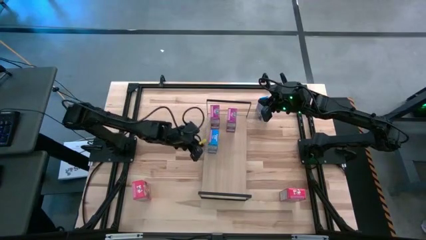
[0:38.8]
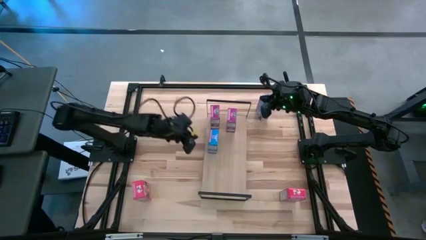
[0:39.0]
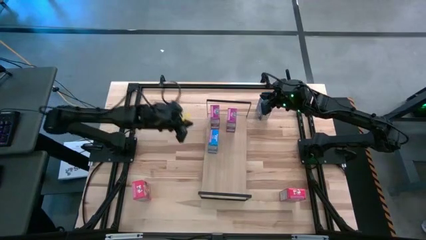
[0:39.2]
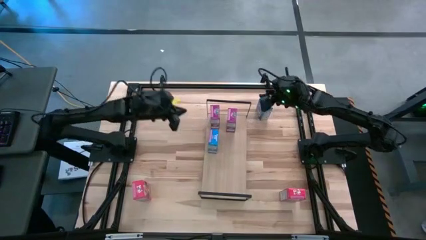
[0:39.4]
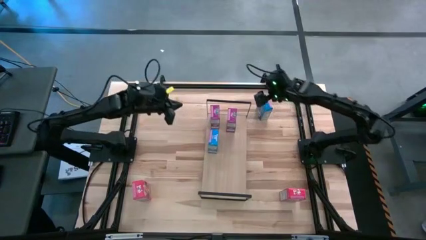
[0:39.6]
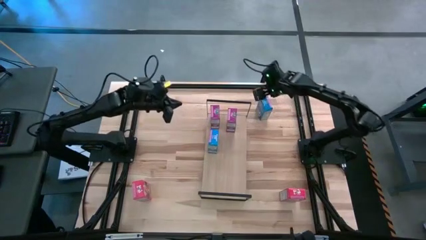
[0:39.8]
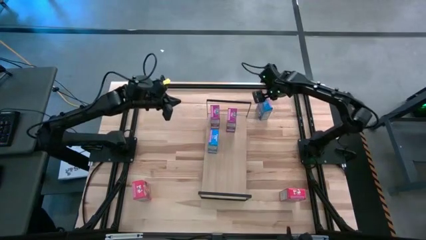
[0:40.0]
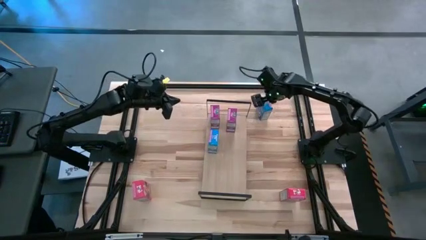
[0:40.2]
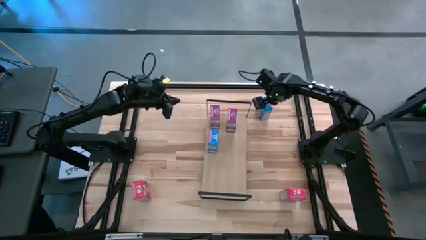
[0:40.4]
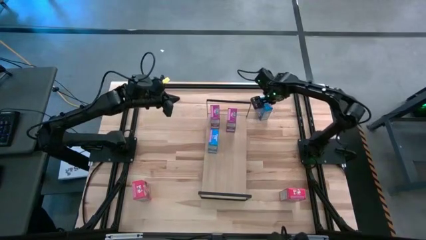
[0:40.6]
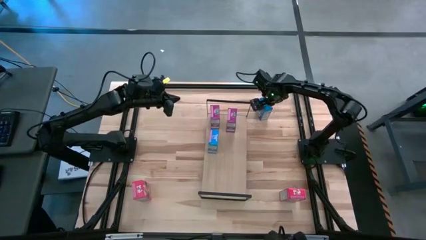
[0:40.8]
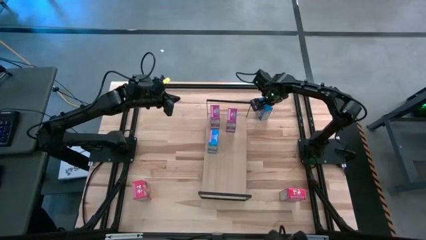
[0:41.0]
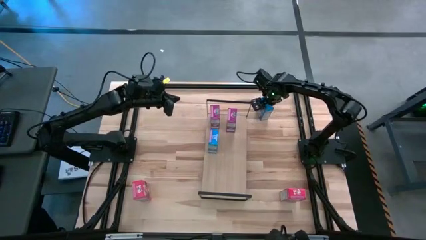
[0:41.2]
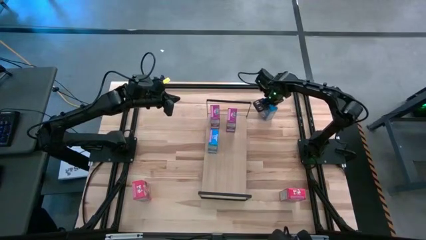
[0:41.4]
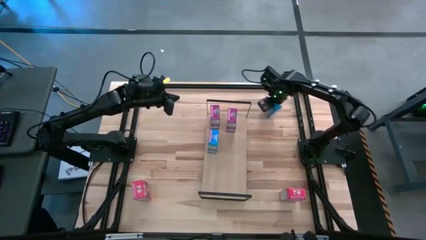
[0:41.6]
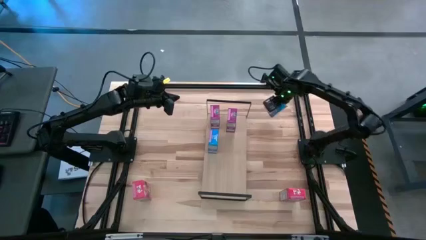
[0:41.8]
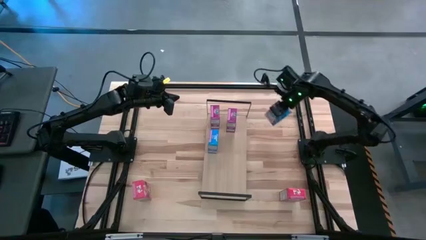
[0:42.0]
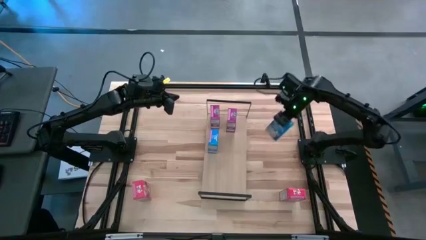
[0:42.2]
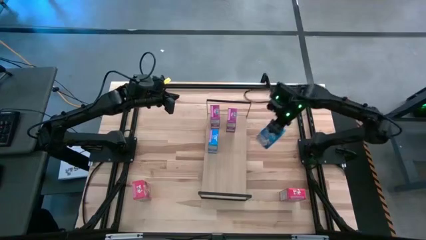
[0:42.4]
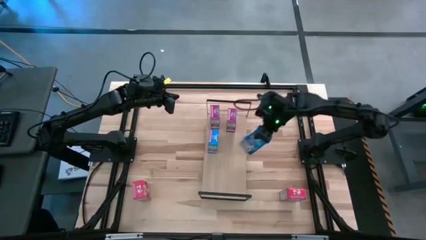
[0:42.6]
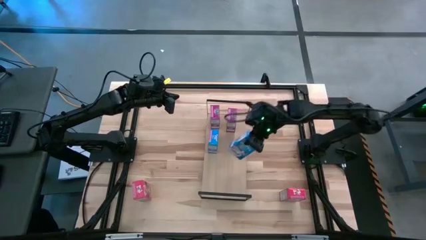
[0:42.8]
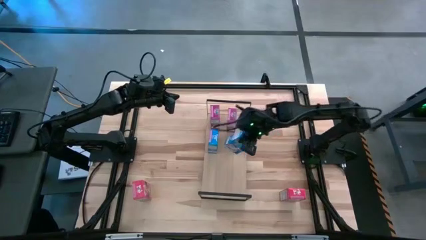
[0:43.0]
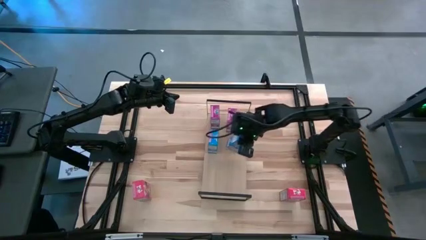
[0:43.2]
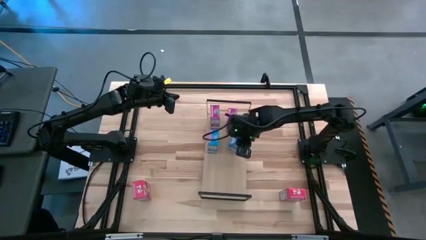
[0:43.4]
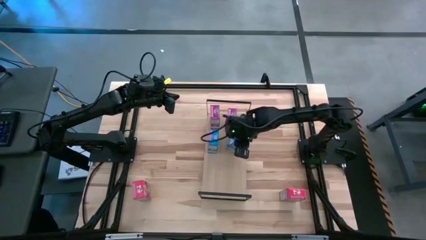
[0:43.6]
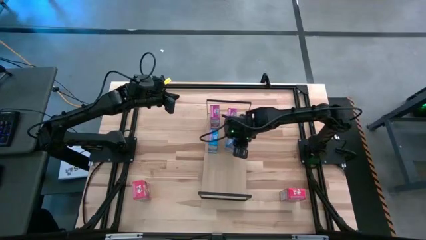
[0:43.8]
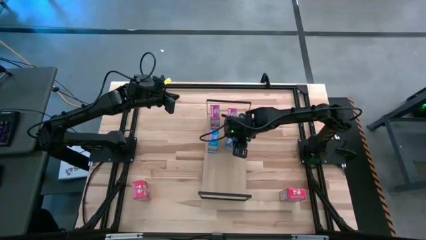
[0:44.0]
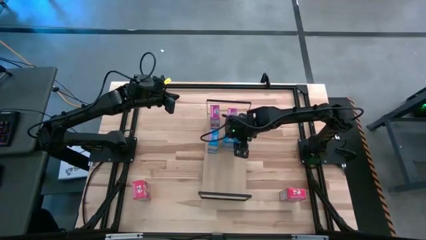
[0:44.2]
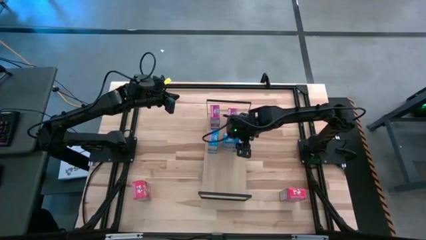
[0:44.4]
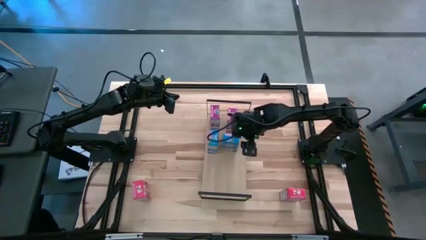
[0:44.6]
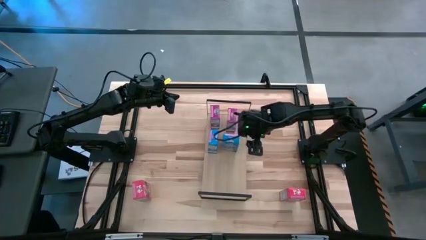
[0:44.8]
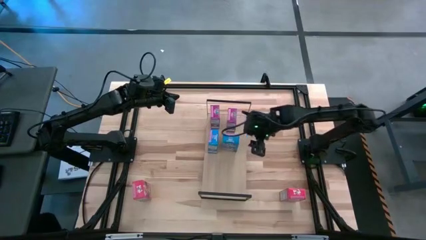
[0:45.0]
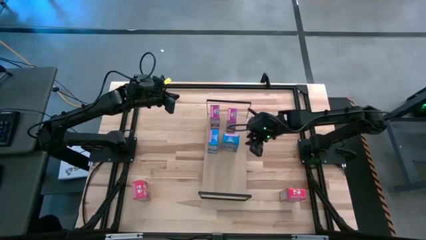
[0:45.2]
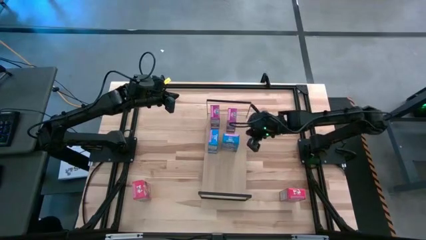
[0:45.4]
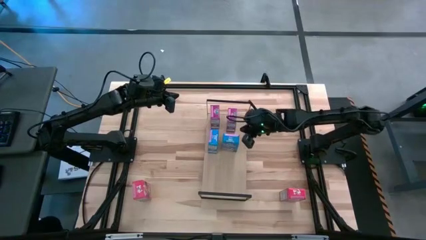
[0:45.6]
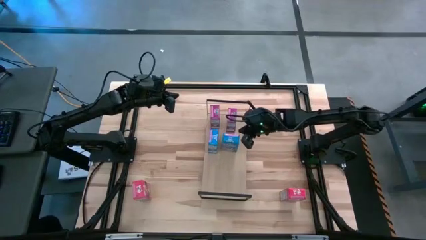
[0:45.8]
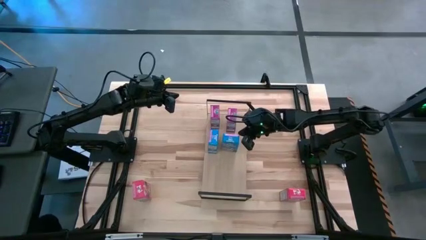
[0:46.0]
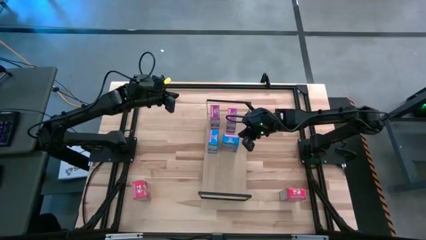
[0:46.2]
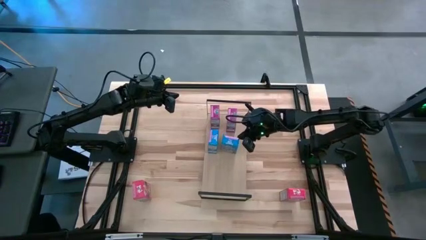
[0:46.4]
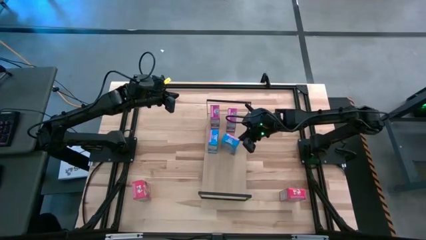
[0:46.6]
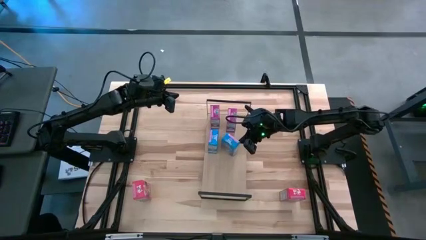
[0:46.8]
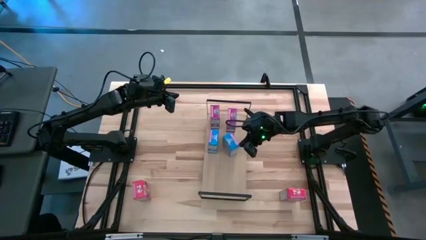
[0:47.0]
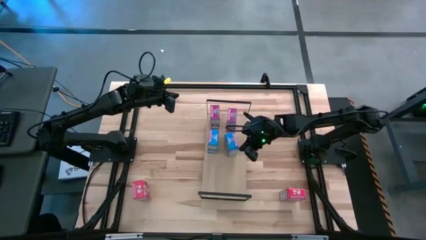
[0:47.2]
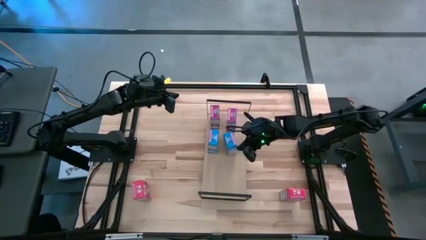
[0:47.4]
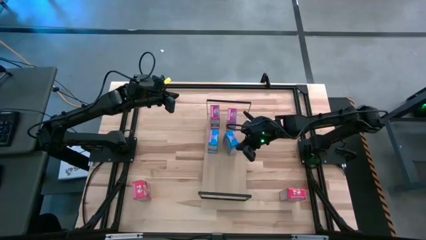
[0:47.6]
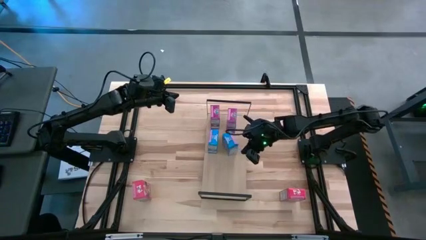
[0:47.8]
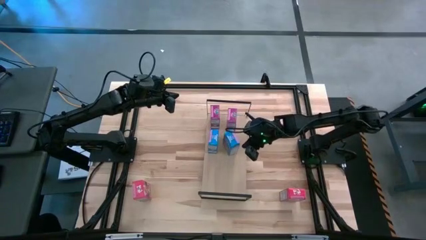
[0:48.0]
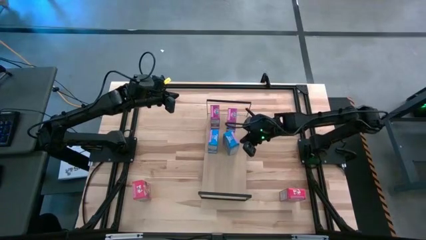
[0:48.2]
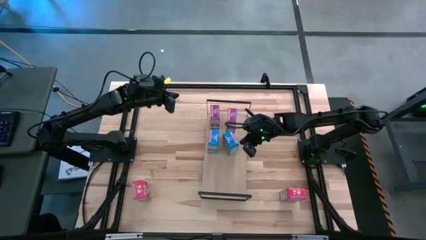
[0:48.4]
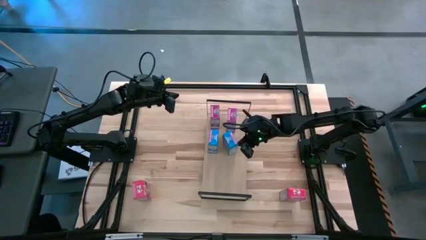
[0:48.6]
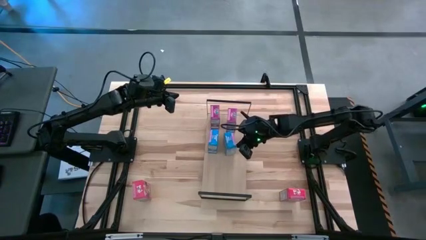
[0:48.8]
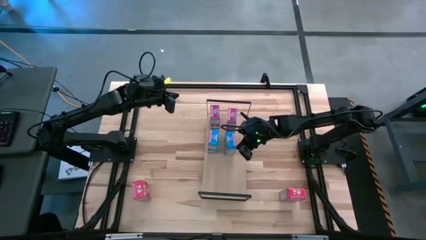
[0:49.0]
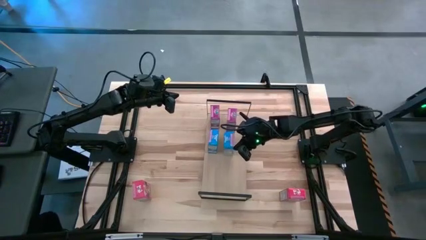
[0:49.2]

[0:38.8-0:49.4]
Task: Stack cereal on shelf
Put the blue cereal box on the shelf aligned with the other blue cereal box
